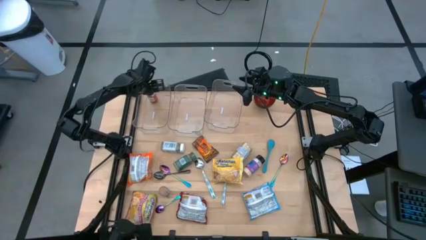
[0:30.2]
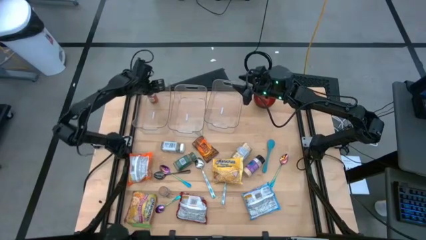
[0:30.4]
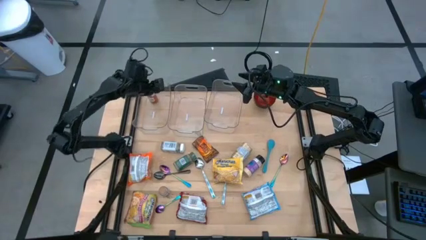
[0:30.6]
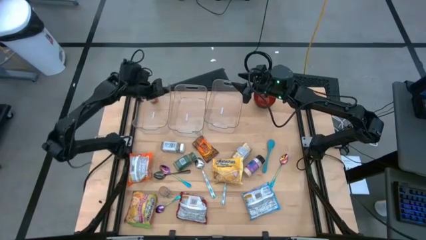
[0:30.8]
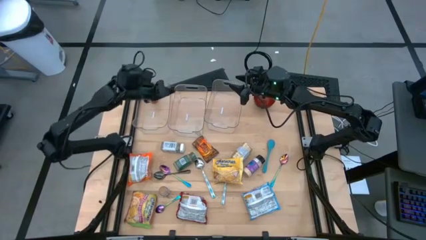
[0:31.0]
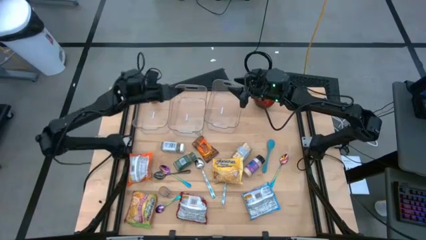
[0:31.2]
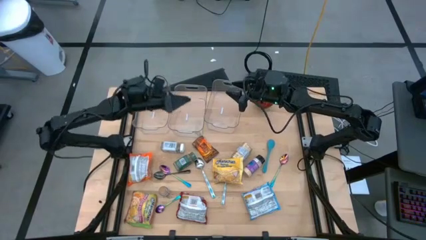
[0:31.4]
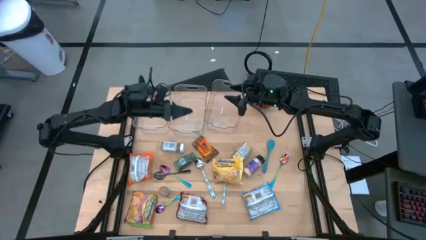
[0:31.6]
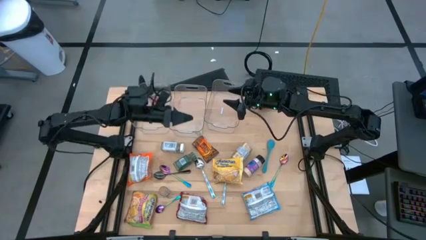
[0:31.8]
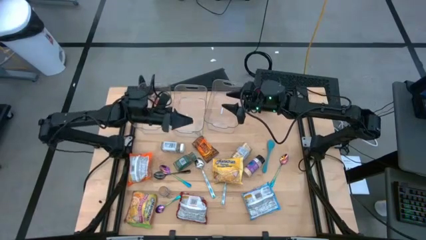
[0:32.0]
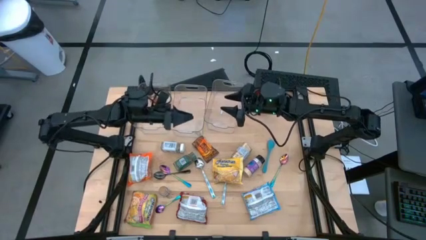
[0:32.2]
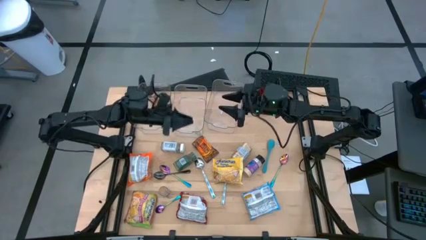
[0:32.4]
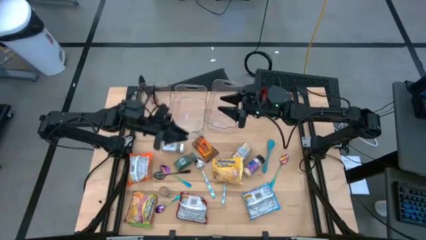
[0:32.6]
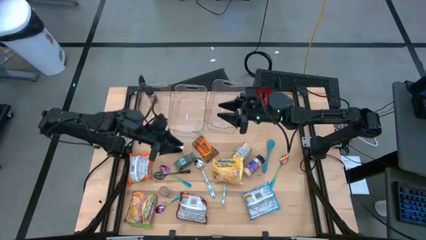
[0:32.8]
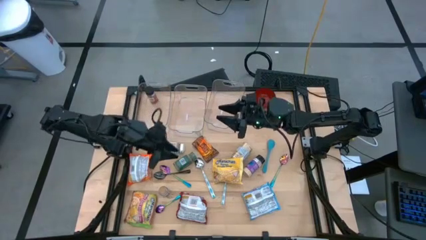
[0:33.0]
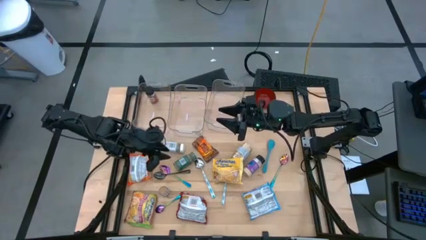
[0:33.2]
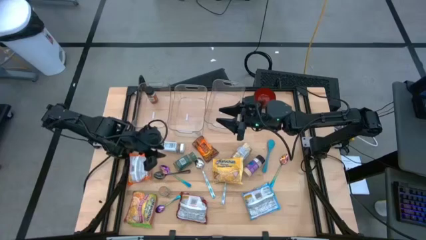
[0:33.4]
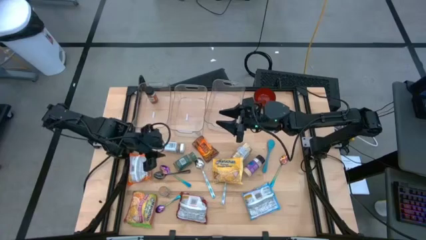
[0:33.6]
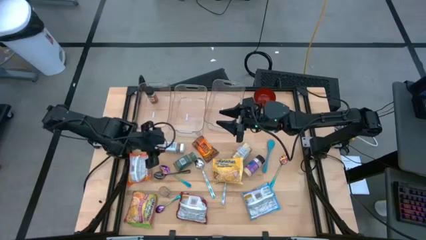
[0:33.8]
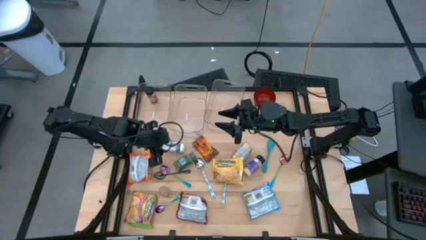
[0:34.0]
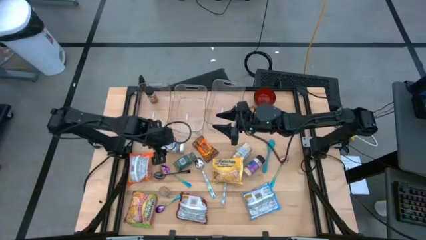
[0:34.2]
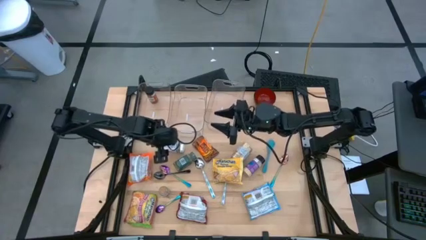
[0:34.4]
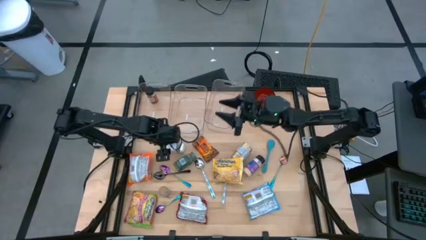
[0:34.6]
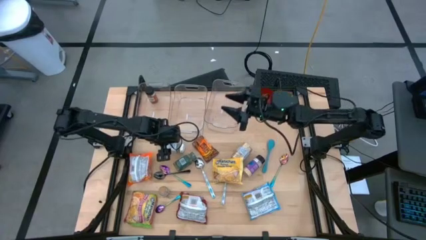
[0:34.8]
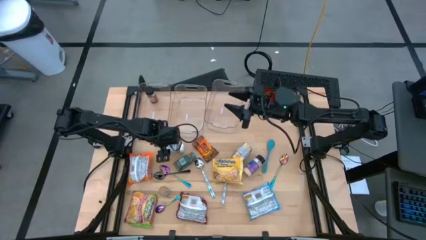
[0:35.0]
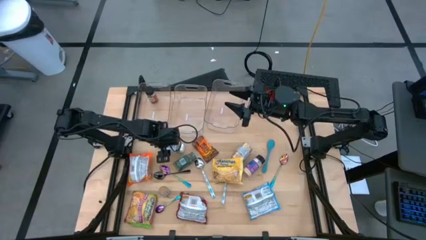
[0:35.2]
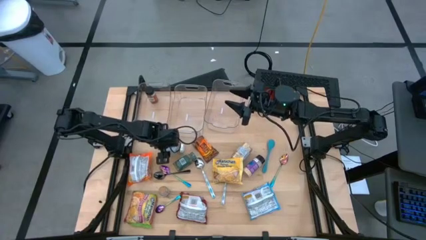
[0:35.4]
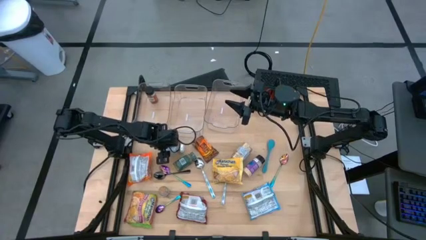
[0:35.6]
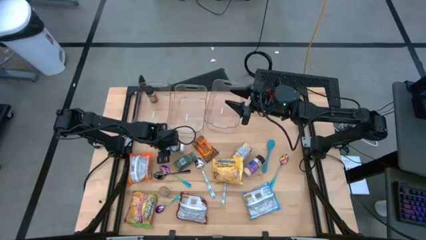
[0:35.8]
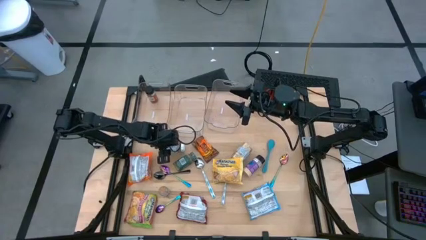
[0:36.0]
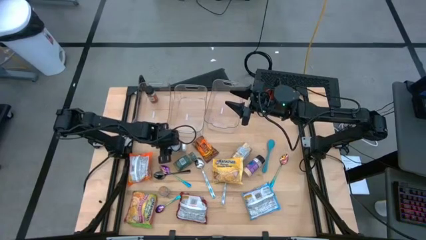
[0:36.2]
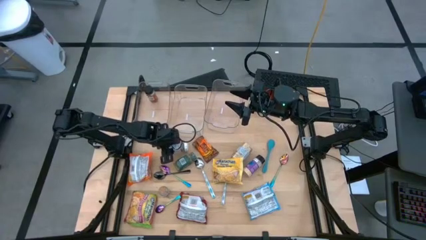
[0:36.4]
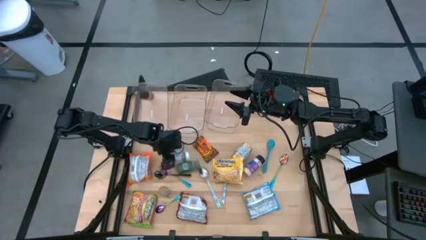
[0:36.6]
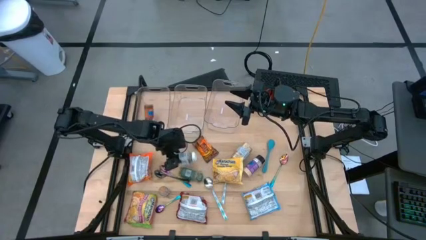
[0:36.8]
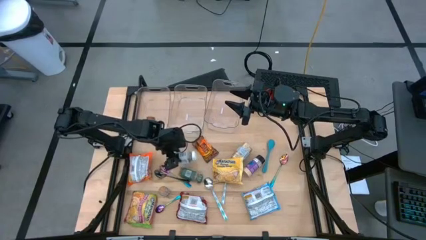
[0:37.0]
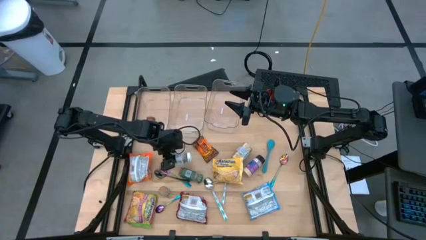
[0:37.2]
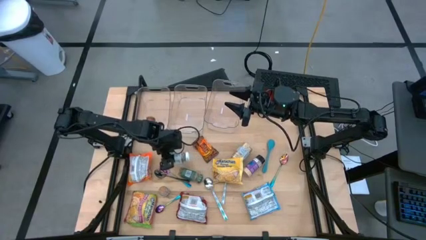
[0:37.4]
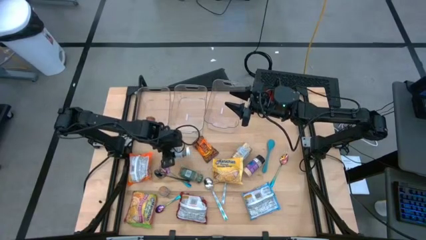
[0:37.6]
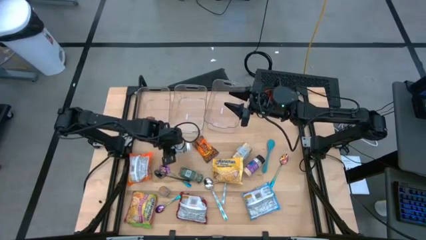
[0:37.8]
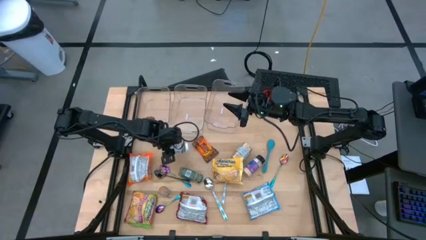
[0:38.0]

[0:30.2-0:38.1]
Task: Pick & Place Food Item
Adjust the white spice bottle on the table

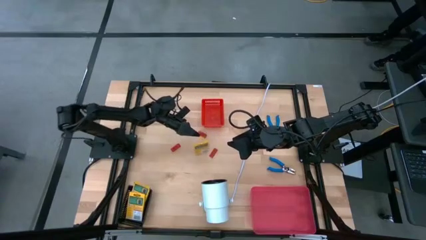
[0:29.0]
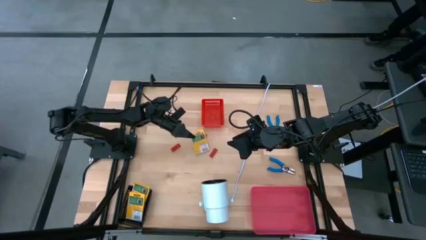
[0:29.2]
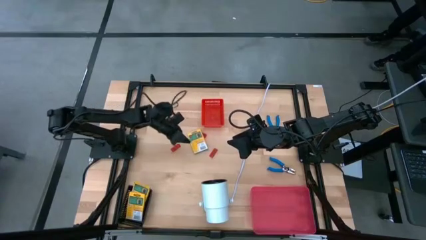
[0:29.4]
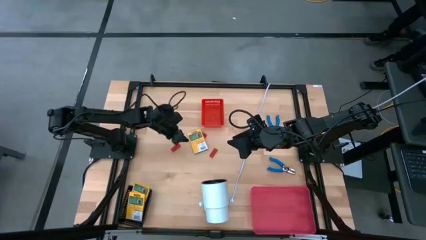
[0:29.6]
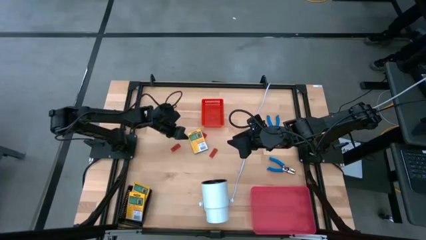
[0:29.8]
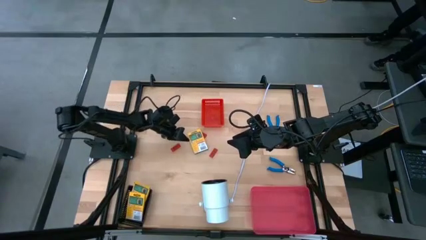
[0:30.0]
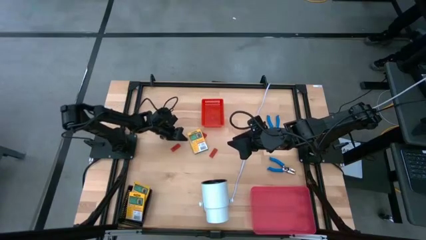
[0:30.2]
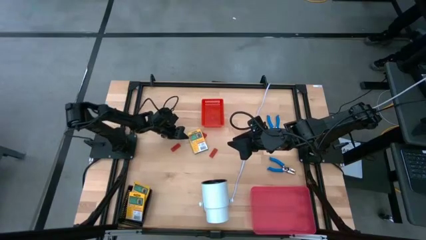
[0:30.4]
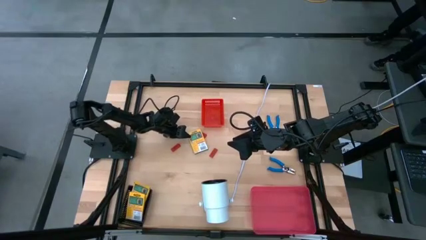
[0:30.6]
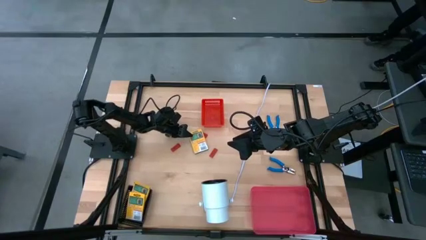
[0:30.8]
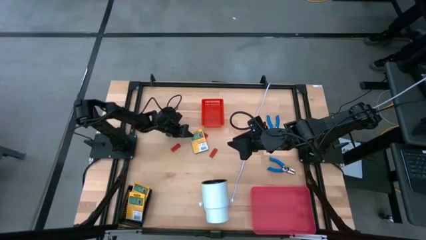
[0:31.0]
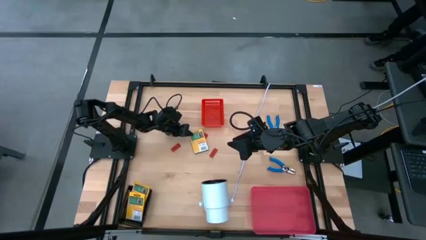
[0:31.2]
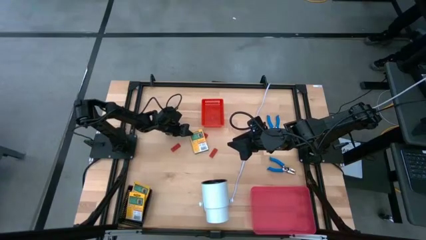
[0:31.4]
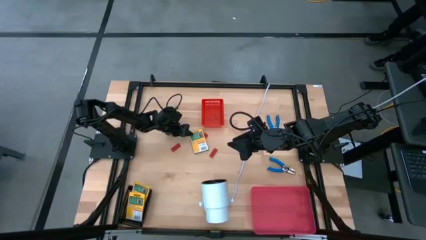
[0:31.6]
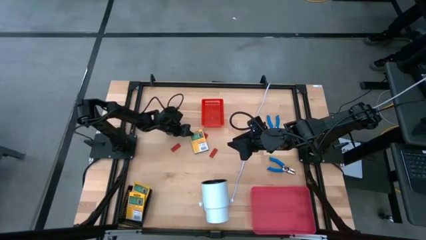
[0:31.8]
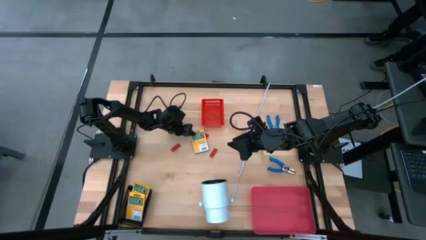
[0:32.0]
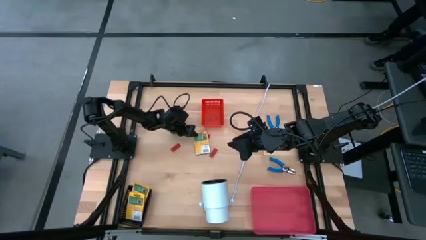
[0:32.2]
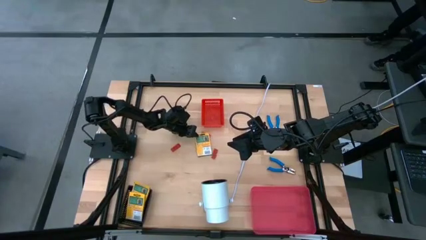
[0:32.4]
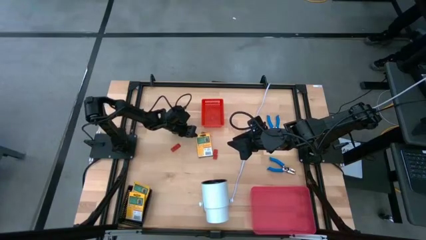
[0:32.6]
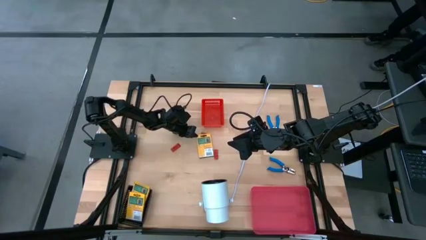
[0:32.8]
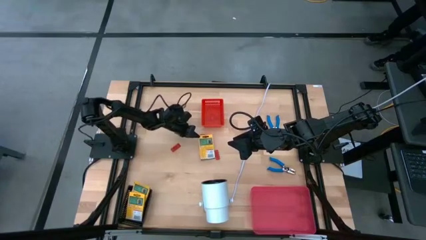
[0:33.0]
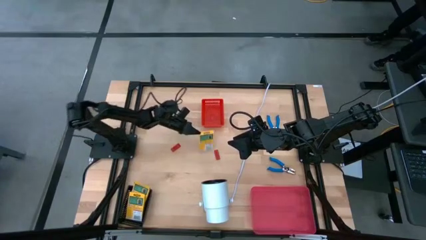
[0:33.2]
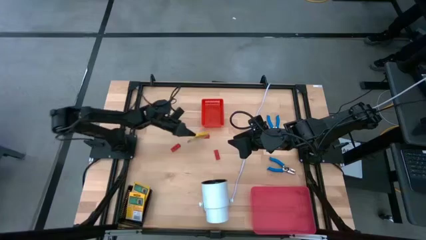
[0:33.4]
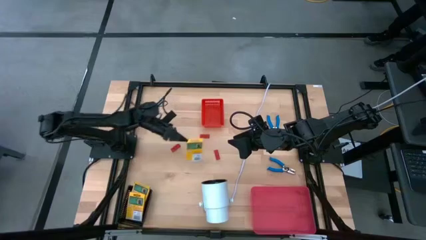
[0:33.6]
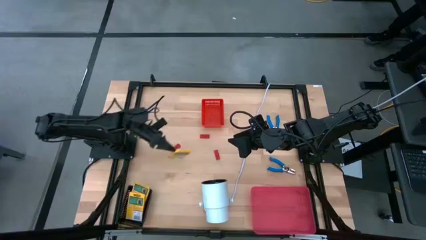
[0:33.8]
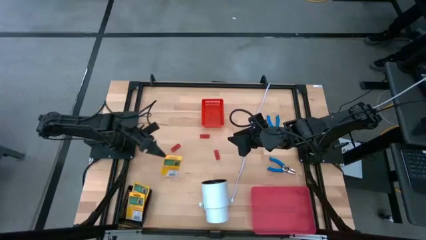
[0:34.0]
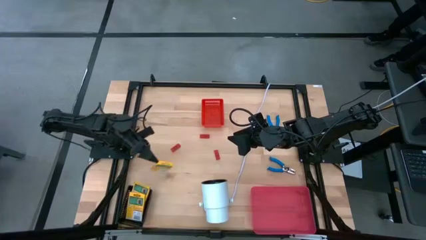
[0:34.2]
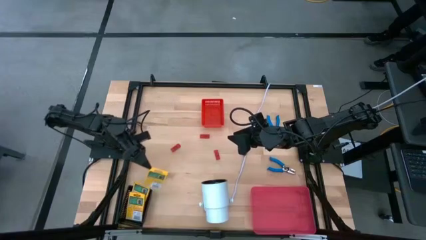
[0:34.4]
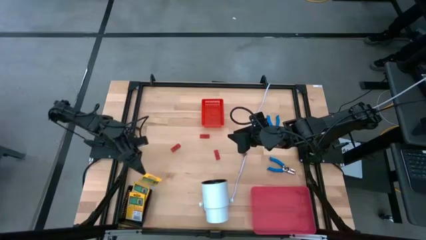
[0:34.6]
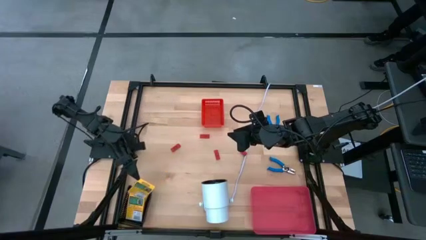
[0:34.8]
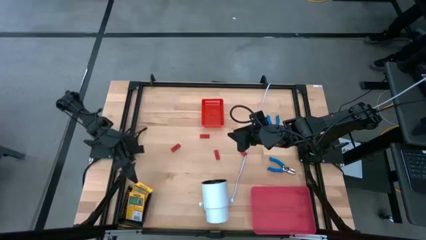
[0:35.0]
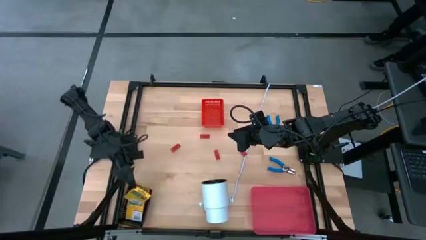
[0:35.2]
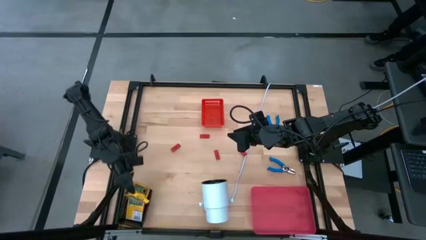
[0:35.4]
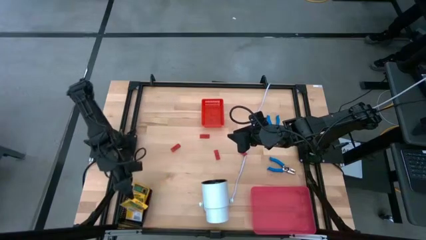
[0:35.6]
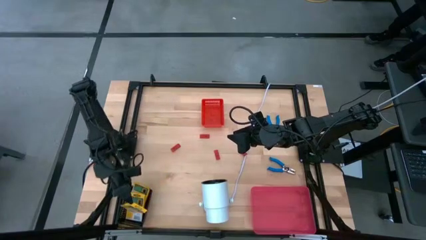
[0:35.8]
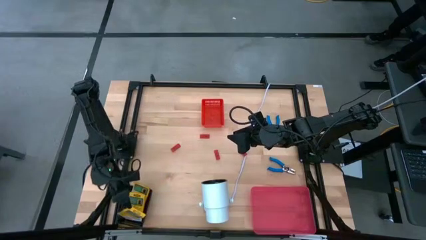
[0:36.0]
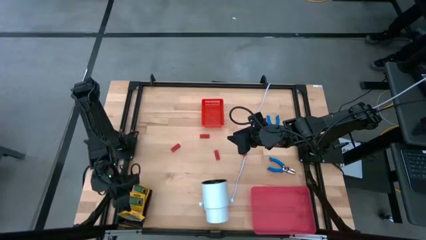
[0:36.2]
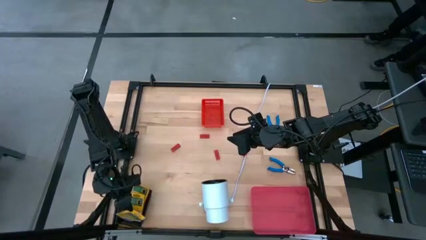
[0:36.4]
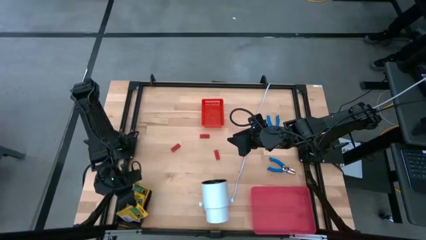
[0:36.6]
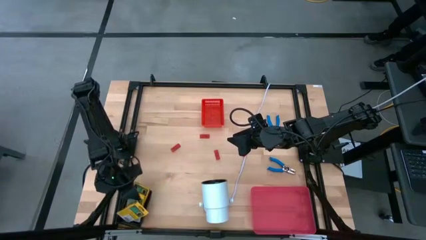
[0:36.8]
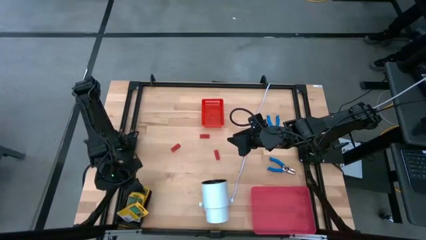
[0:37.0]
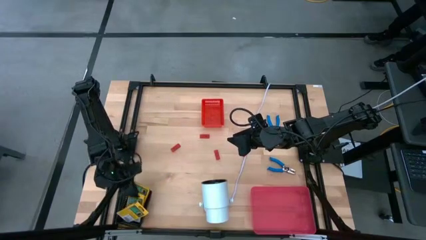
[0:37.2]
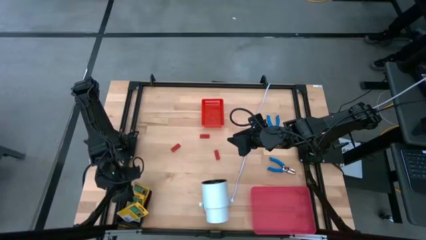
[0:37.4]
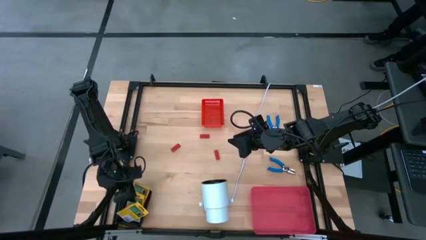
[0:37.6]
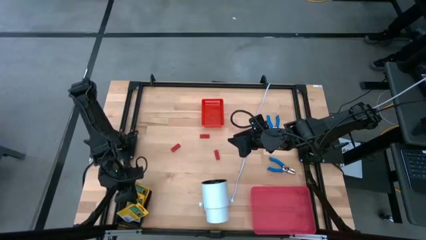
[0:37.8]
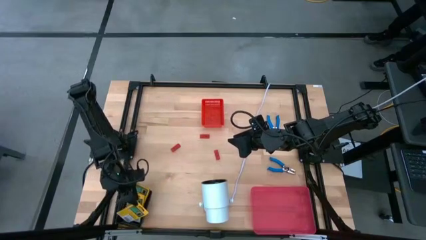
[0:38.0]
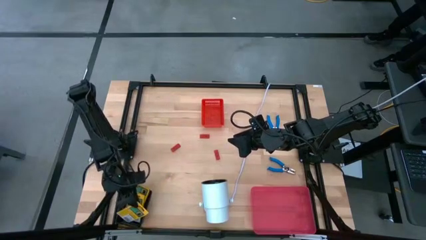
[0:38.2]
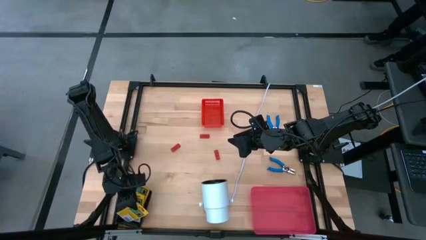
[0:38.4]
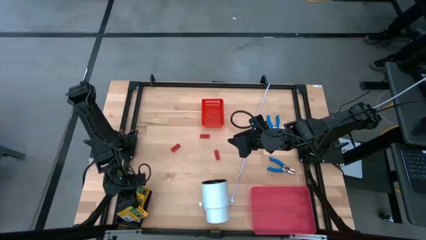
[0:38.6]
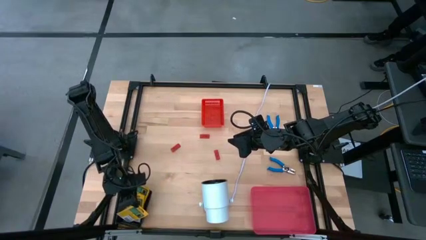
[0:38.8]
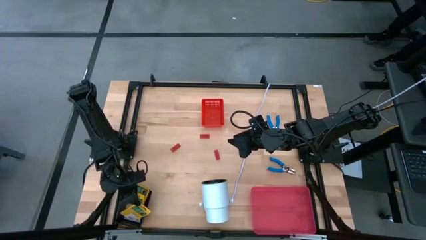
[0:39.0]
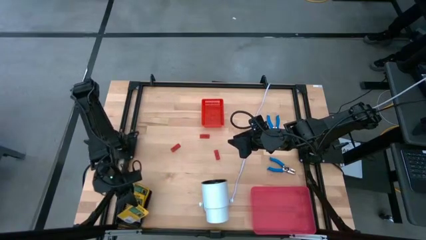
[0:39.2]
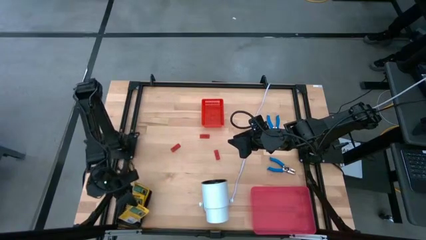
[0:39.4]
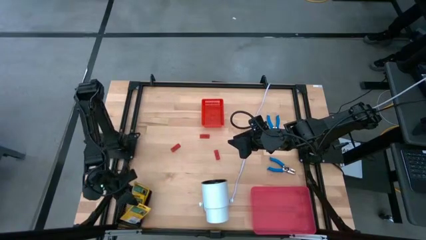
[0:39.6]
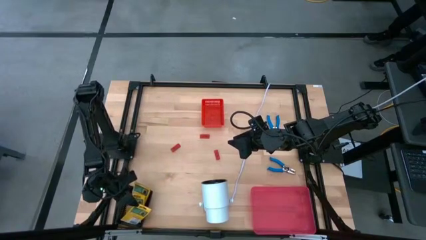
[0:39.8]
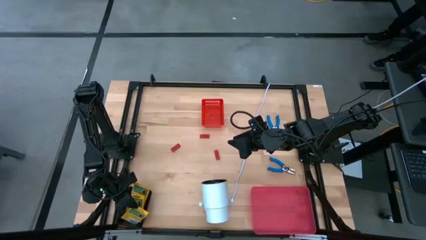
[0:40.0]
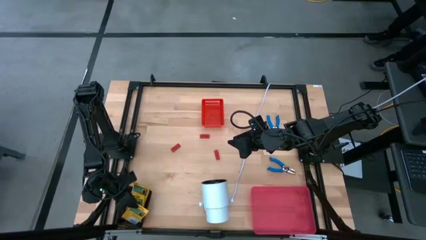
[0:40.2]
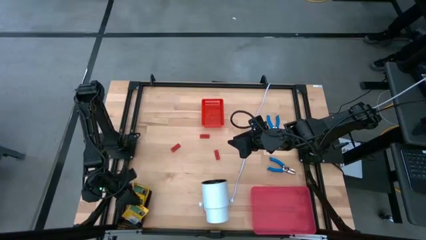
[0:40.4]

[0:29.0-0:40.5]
Task: Pick & Place School Supplies
Put the yellow box crayon into the black bin
